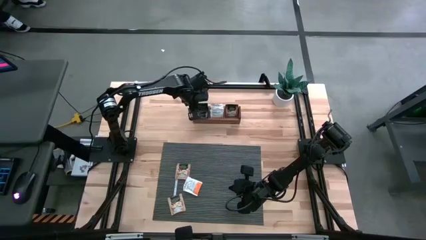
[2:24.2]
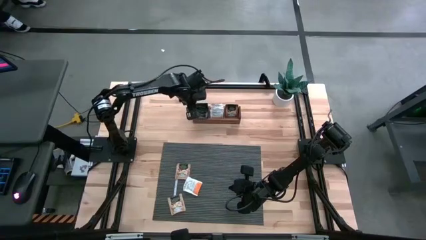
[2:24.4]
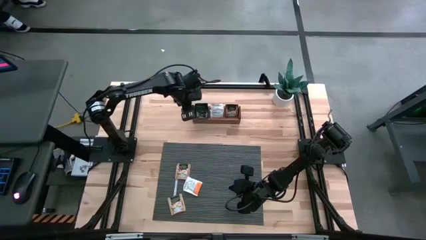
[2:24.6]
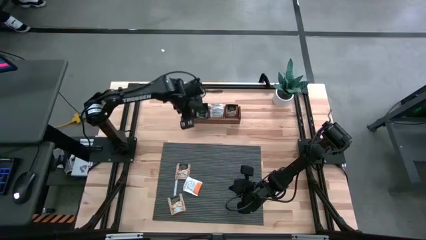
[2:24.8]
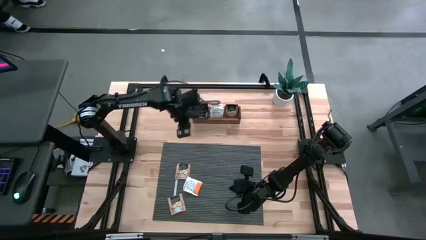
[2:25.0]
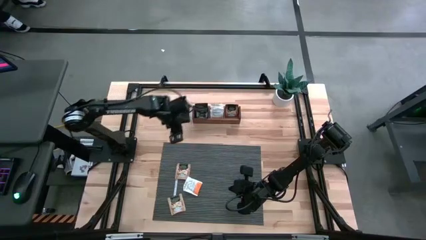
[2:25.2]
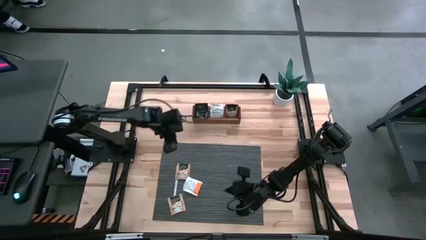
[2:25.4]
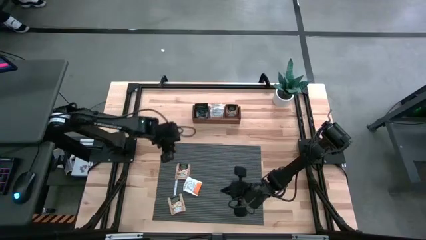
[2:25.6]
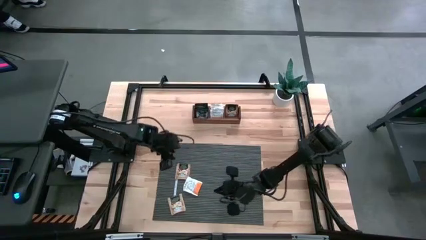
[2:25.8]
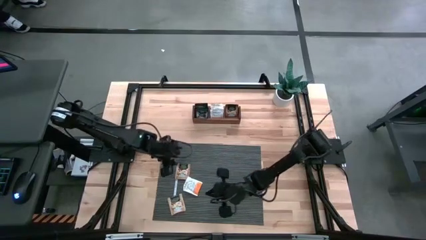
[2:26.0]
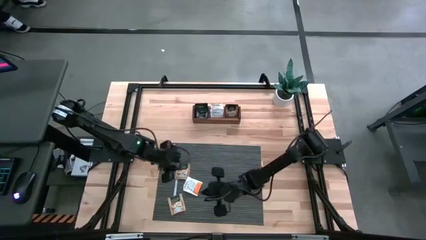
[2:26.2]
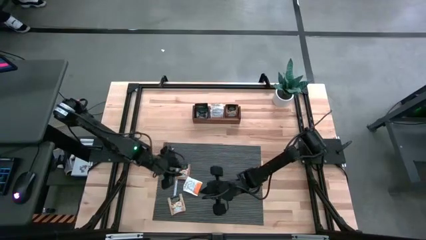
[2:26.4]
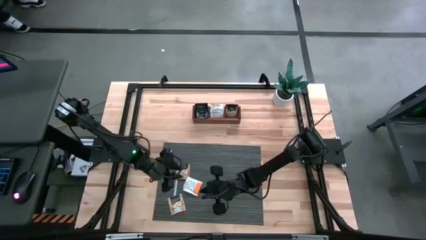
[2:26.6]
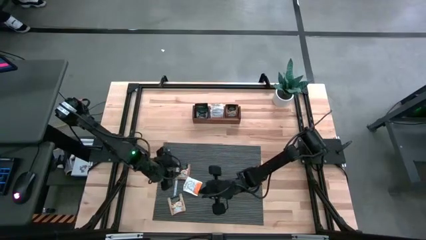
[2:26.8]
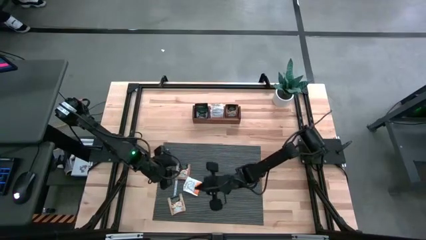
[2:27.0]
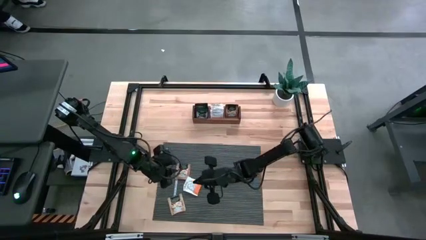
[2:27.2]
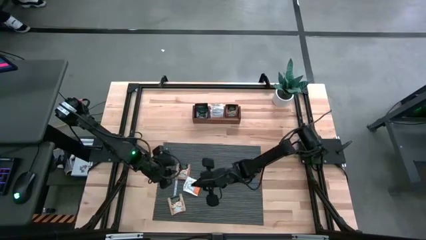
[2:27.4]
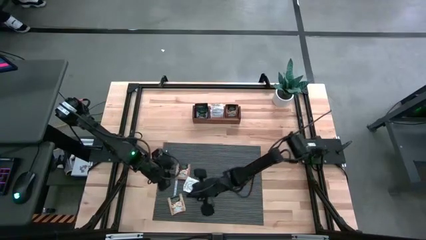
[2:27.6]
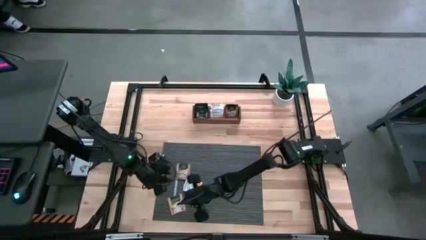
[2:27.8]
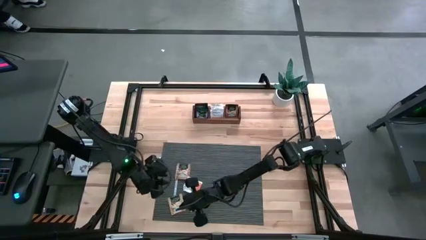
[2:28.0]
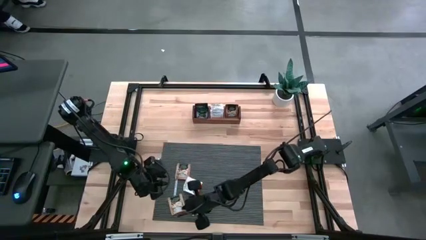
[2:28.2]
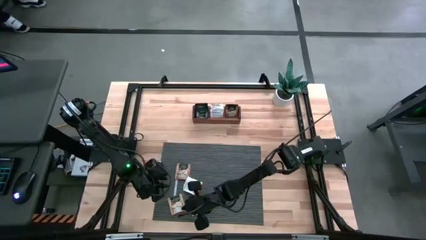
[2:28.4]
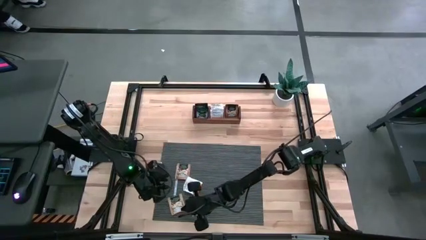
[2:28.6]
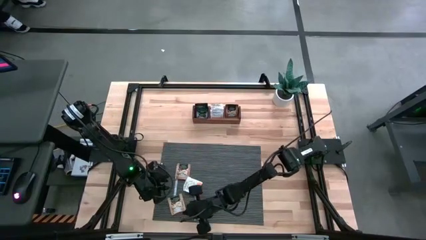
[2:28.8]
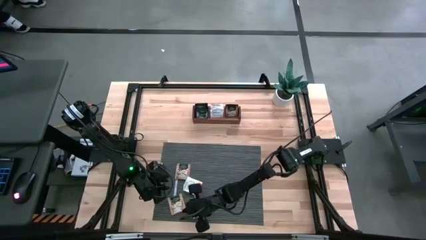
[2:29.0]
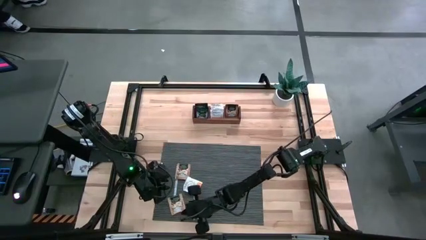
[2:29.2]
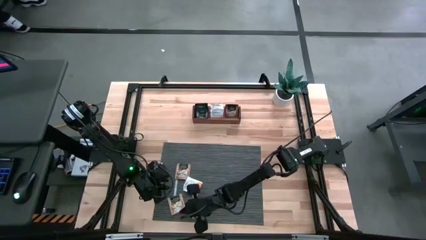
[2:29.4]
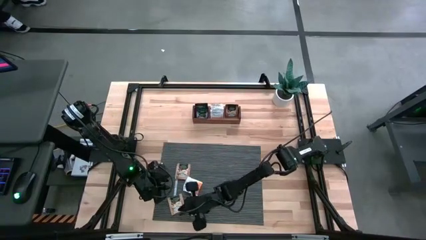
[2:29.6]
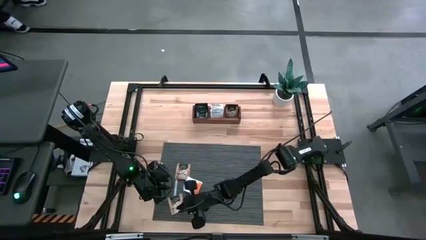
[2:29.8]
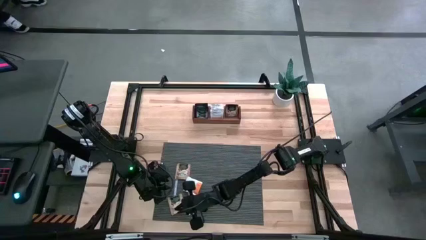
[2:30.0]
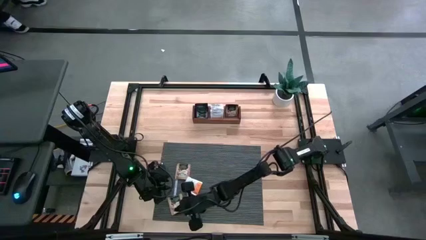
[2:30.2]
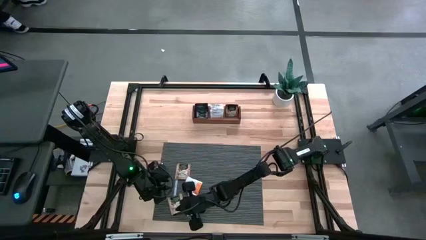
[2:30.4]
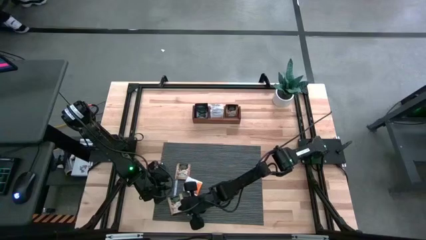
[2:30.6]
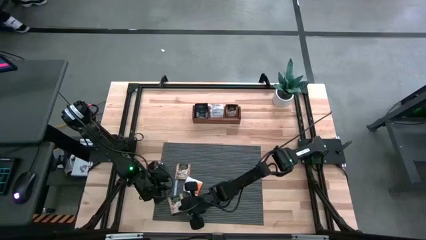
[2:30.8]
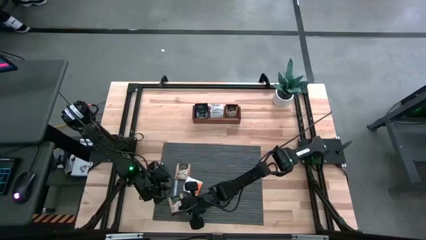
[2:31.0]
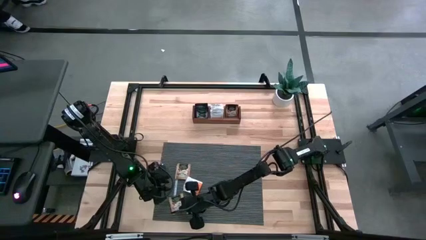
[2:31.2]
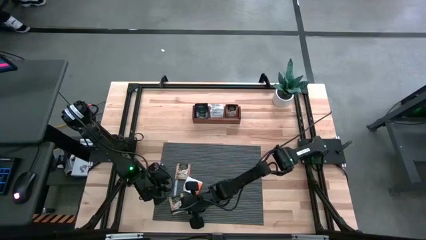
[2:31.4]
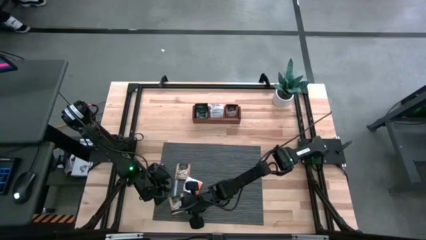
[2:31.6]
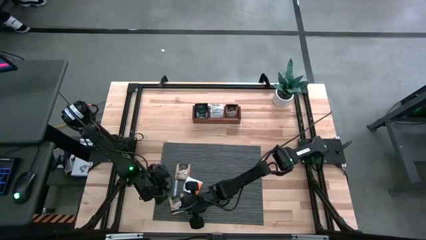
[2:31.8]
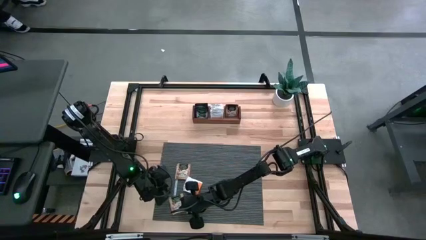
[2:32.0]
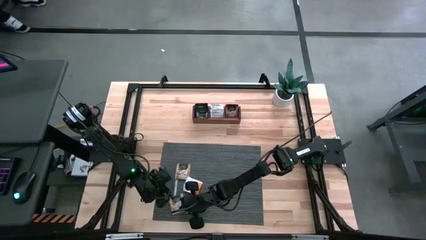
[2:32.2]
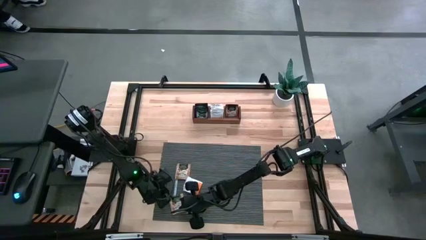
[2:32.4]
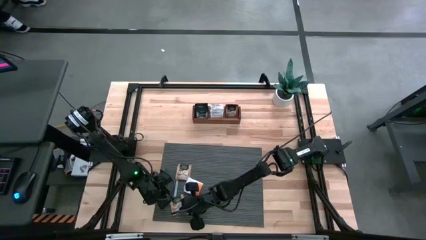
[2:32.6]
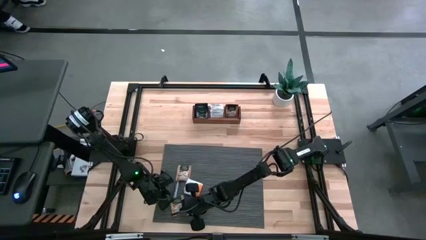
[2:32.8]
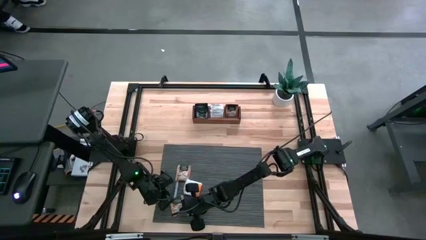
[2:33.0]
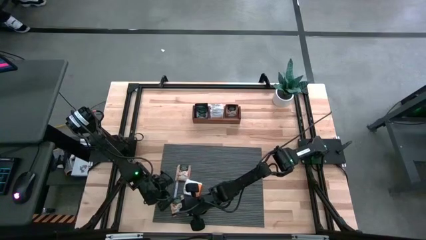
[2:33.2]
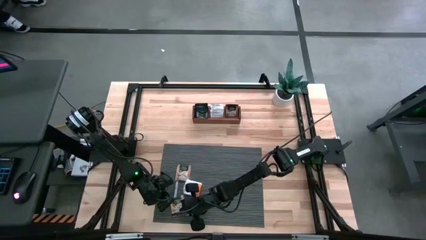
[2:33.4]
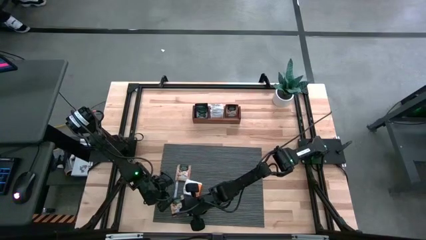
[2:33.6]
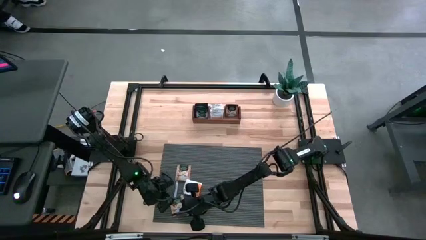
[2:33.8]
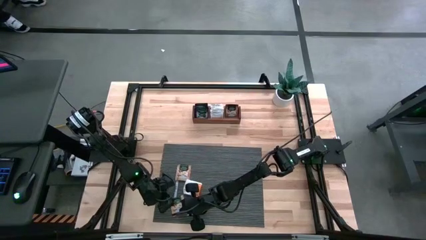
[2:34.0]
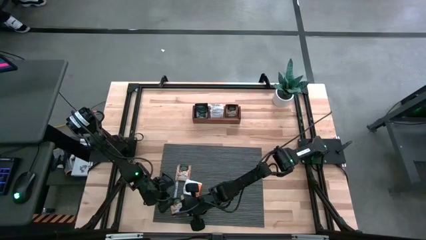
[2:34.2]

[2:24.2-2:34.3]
Task: Pick & Place Tea
Put the light brown tea bag into the right compartment of the wooden organizer

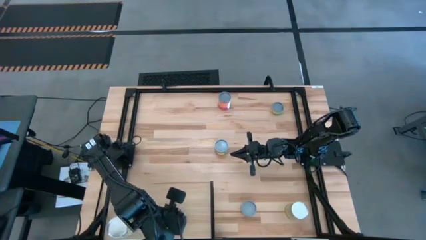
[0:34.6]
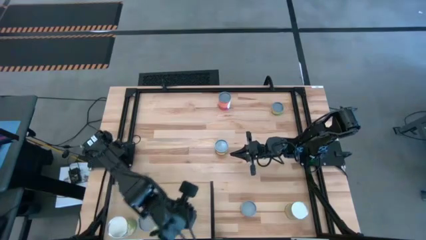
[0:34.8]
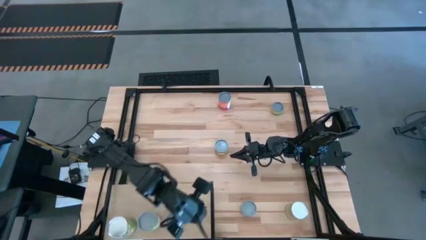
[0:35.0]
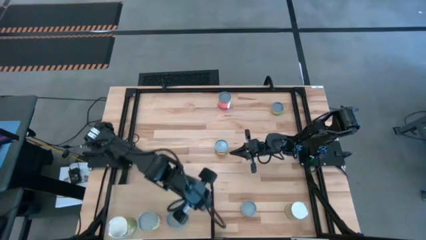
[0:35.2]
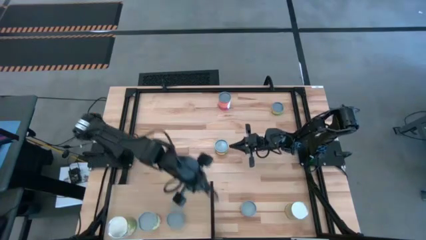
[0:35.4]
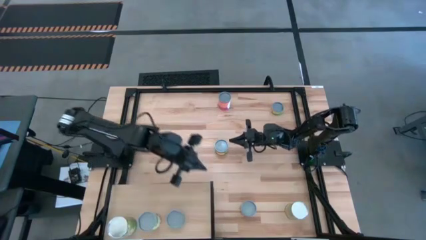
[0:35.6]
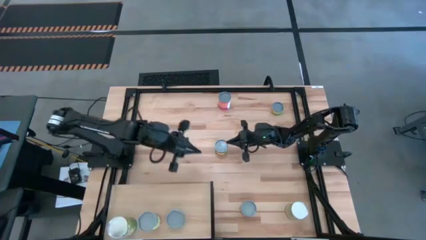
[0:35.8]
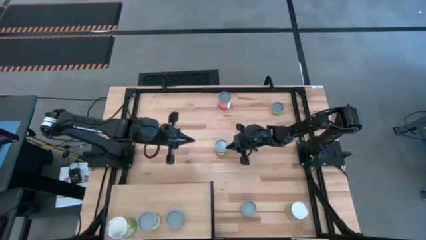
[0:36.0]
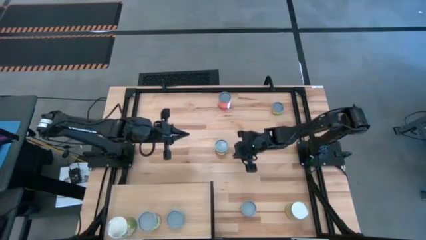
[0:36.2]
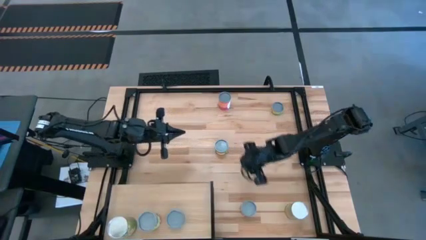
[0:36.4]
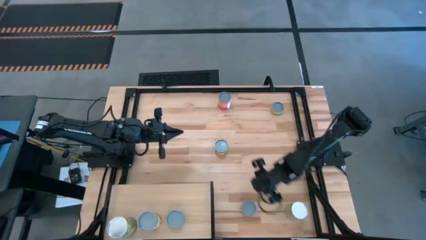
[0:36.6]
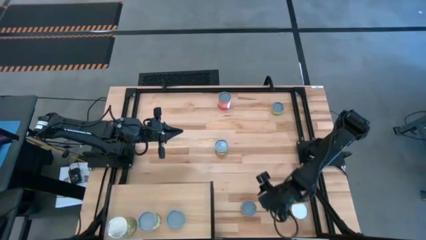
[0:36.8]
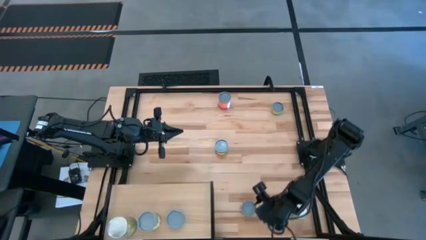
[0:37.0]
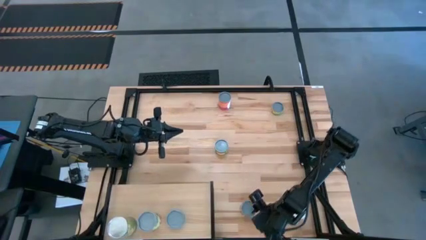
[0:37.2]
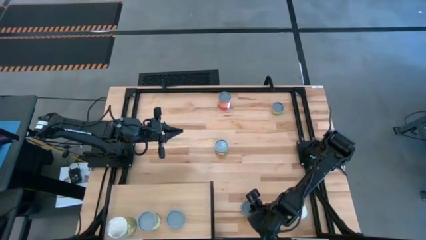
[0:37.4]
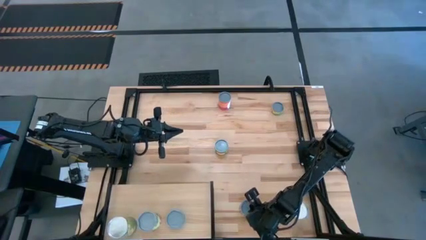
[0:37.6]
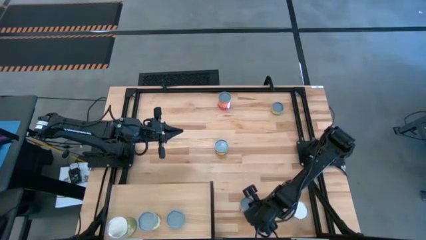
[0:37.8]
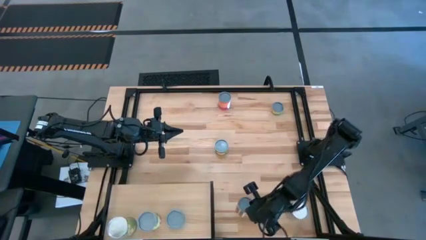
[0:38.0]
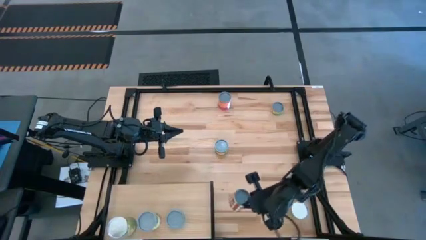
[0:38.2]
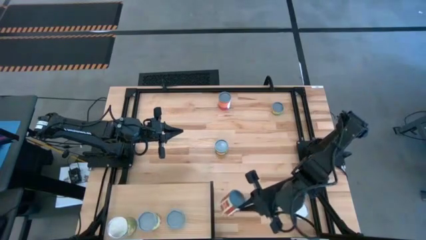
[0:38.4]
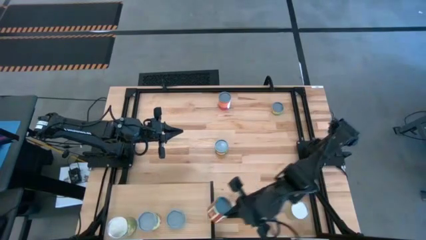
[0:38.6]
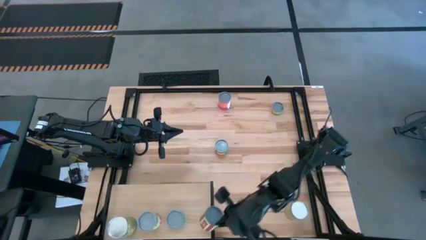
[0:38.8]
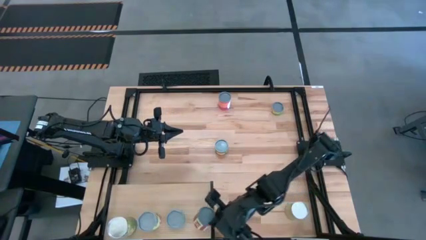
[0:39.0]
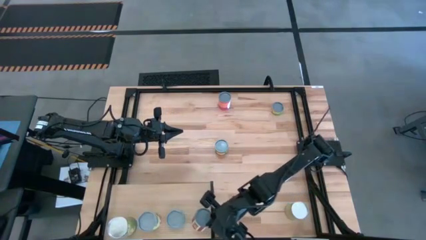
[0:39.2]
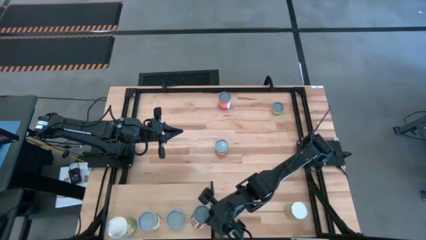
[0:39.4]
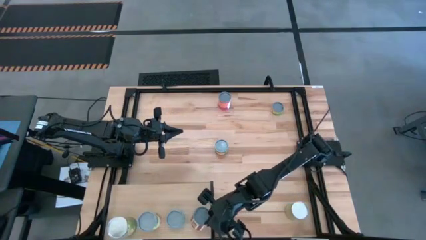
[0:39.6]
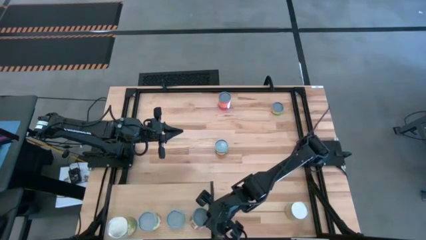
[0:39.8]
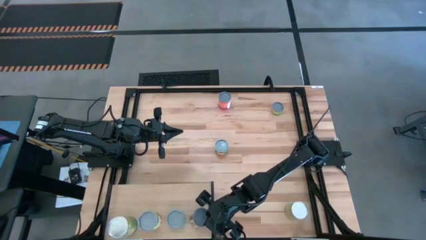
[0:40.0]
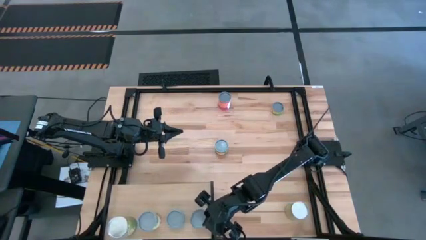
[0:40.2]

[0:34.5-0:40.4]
Task: Pick and place cans onto a shelf
Put the canned diced tomatoes on the shelf

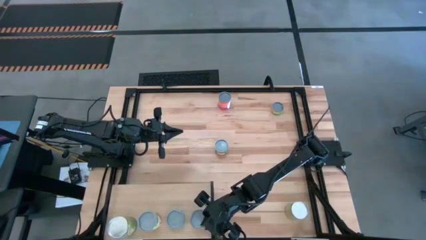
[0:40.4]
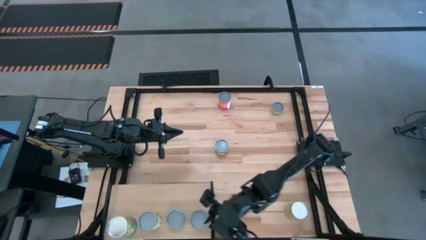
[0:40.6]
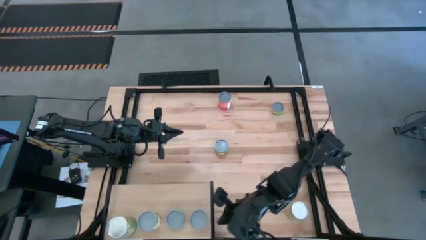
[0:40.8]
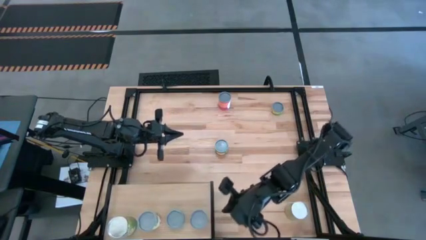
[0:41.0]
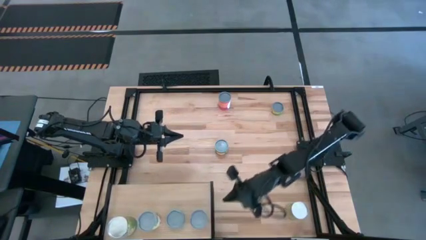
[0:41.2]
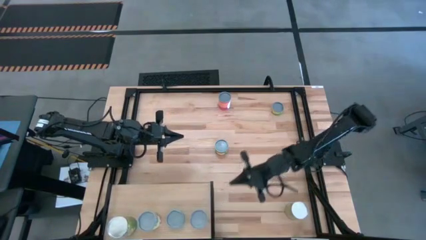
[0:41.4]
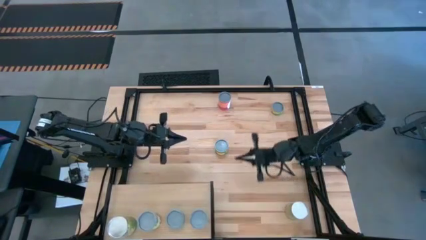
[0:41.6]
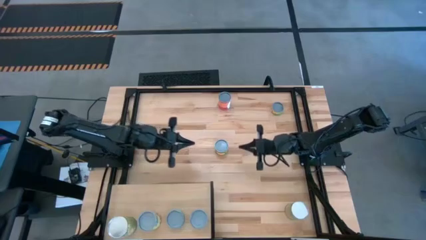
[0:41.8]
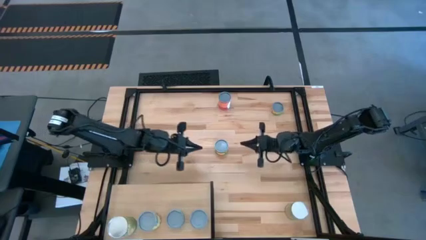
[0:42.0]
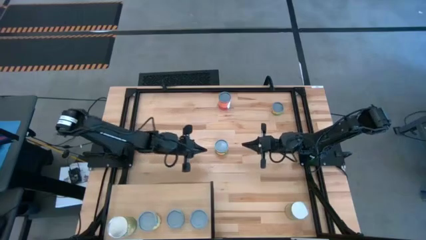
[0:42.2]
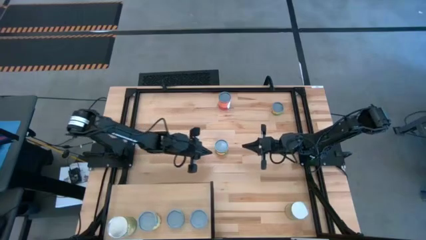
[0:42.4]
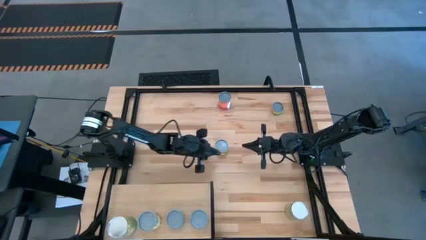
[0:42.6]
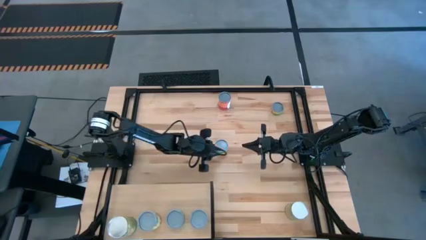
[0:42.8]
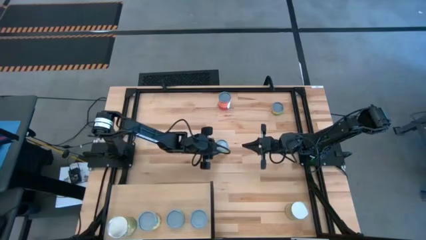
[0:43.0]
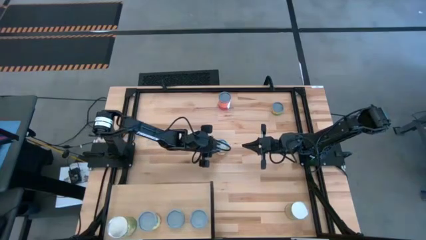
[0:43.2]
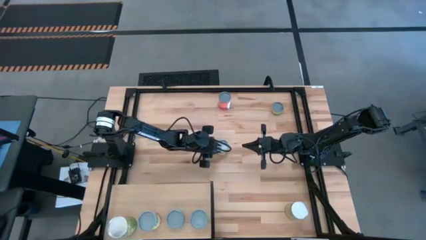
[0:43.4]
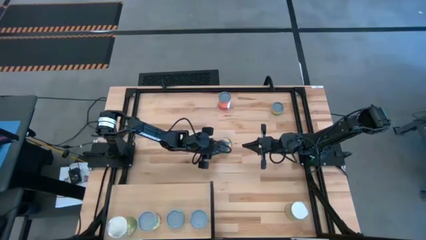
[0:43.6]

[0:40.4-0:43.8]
Put the canned peaches on the shelf
